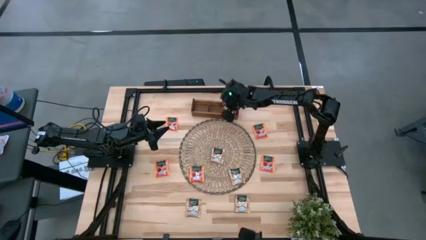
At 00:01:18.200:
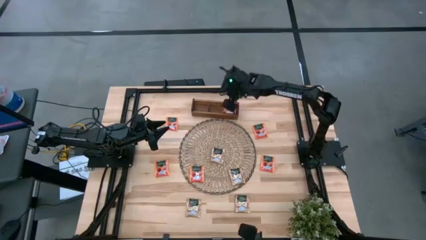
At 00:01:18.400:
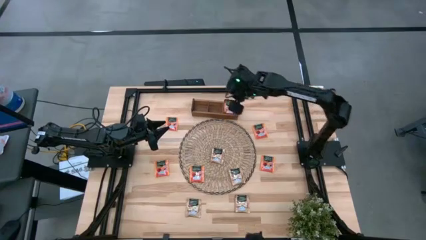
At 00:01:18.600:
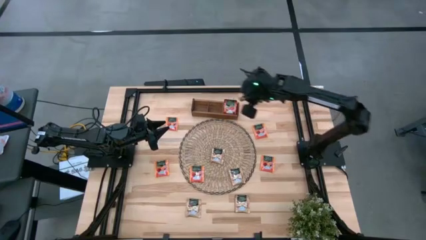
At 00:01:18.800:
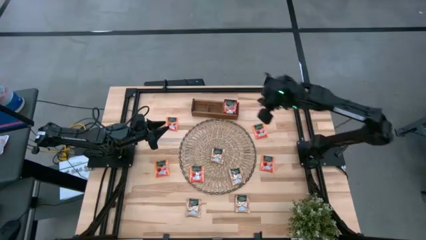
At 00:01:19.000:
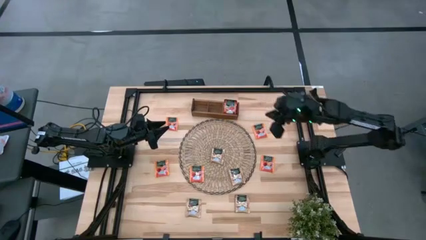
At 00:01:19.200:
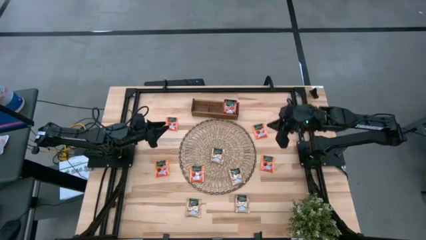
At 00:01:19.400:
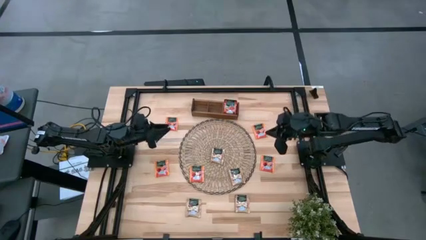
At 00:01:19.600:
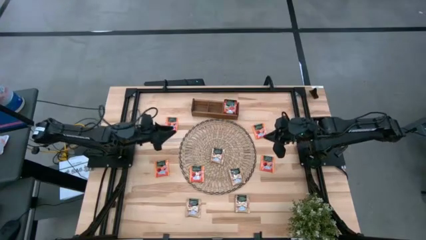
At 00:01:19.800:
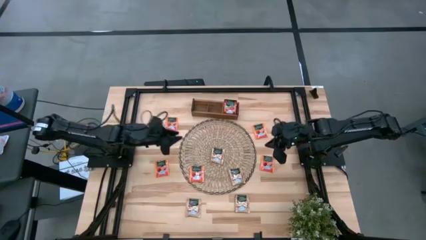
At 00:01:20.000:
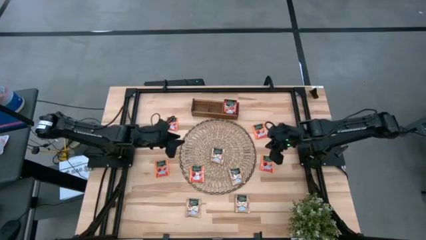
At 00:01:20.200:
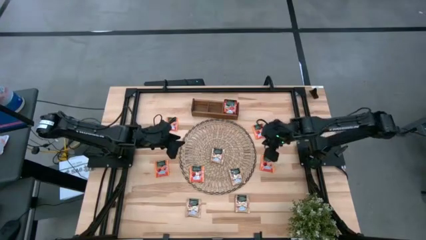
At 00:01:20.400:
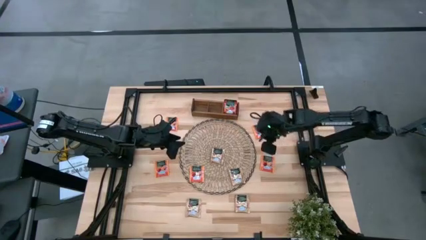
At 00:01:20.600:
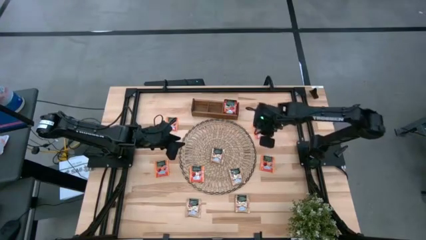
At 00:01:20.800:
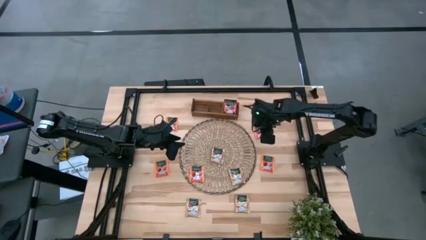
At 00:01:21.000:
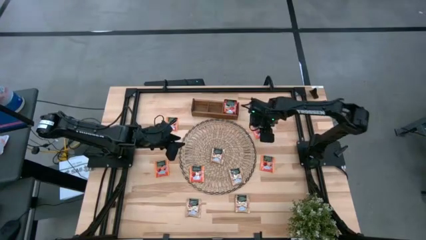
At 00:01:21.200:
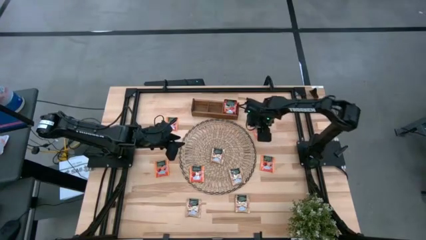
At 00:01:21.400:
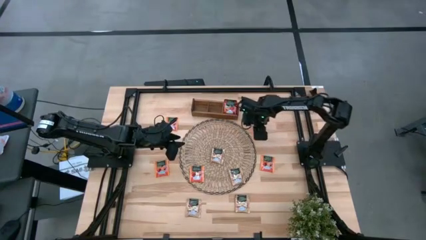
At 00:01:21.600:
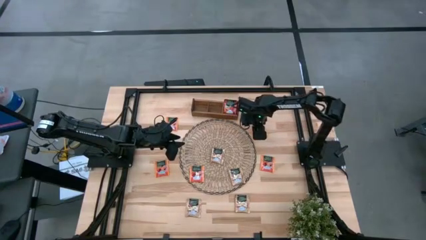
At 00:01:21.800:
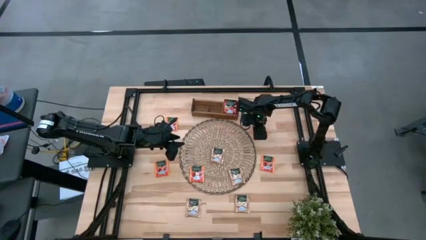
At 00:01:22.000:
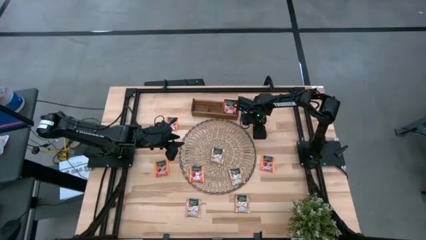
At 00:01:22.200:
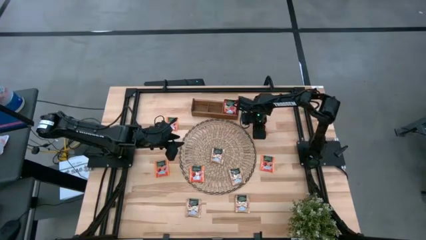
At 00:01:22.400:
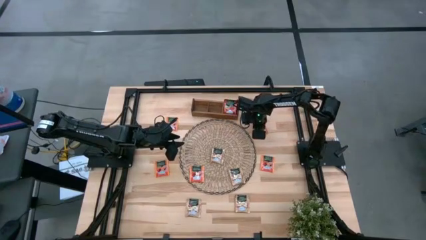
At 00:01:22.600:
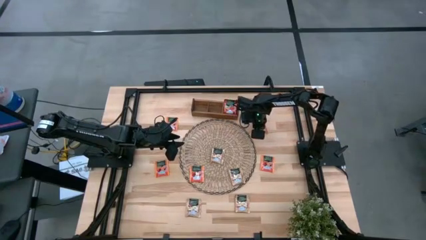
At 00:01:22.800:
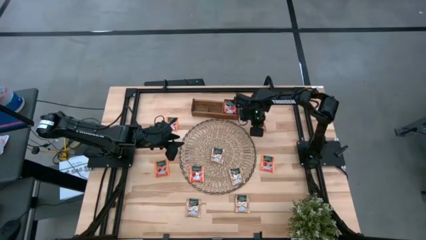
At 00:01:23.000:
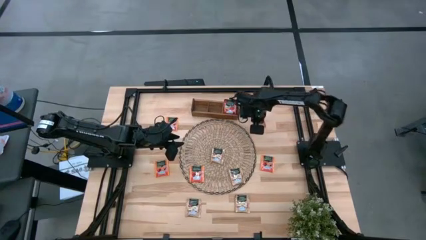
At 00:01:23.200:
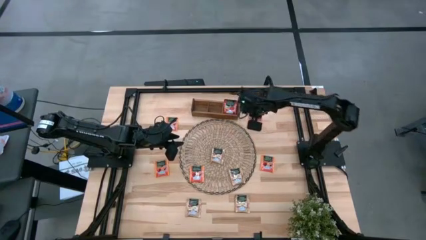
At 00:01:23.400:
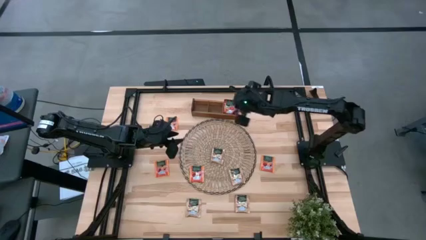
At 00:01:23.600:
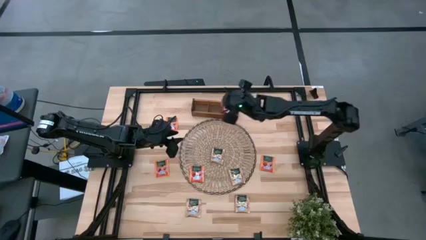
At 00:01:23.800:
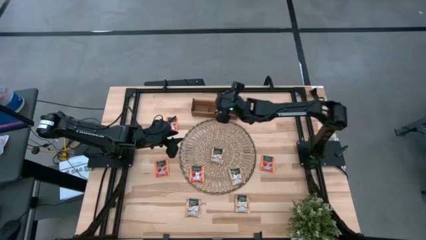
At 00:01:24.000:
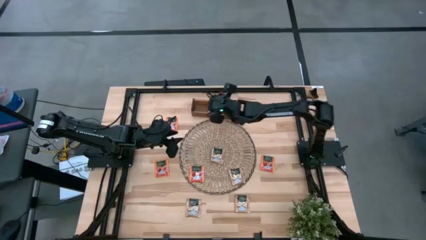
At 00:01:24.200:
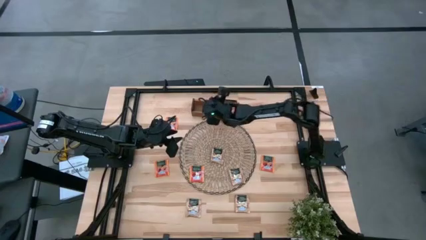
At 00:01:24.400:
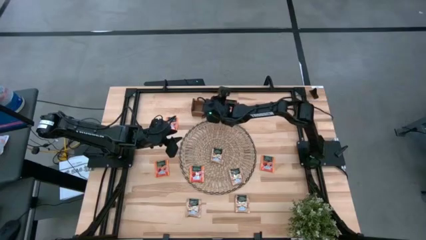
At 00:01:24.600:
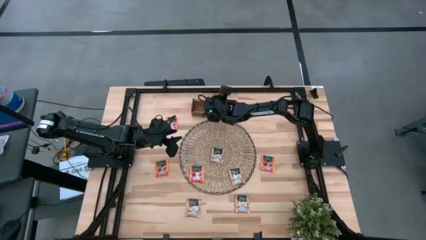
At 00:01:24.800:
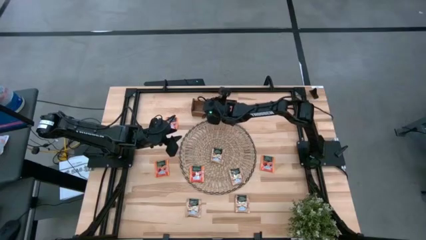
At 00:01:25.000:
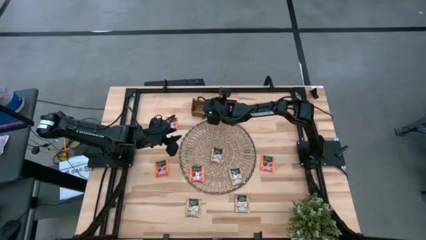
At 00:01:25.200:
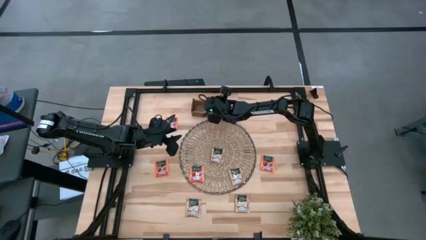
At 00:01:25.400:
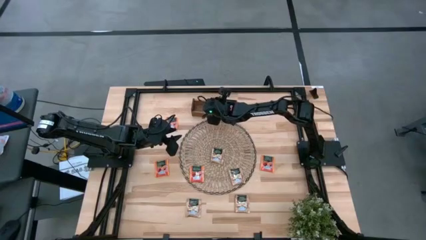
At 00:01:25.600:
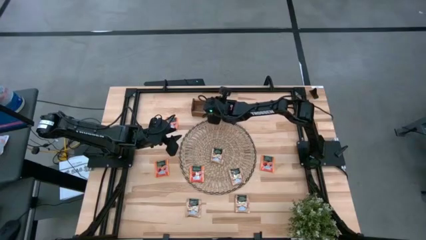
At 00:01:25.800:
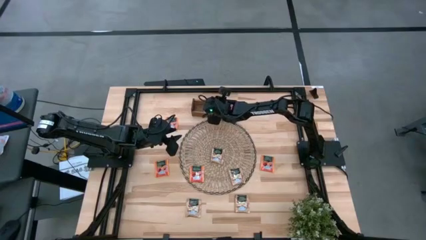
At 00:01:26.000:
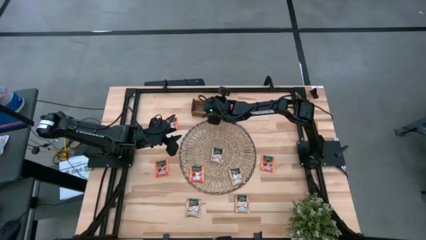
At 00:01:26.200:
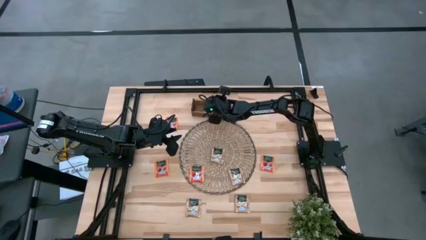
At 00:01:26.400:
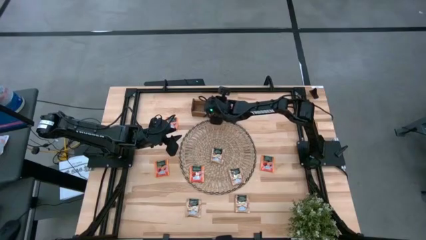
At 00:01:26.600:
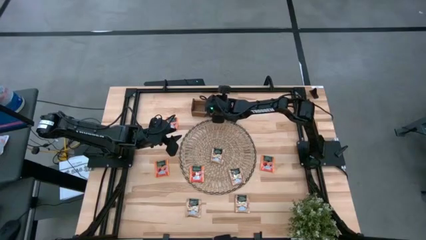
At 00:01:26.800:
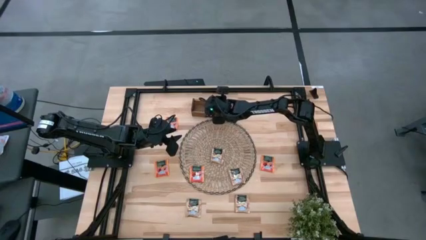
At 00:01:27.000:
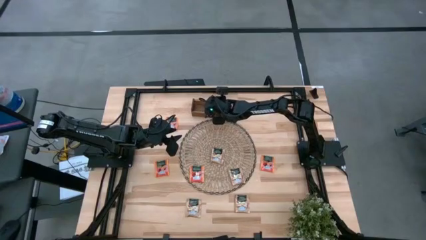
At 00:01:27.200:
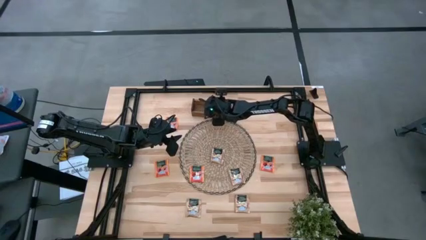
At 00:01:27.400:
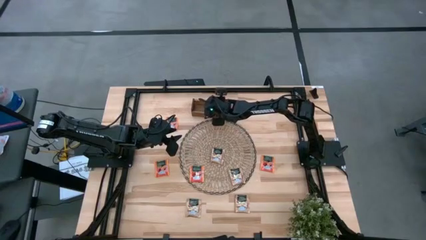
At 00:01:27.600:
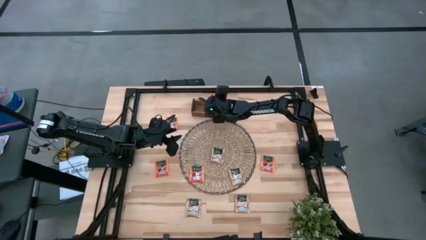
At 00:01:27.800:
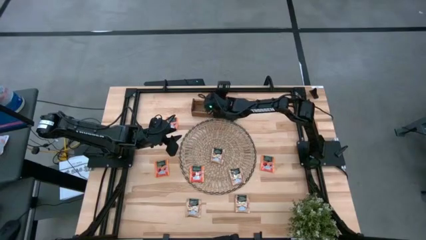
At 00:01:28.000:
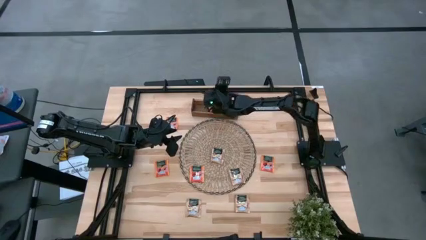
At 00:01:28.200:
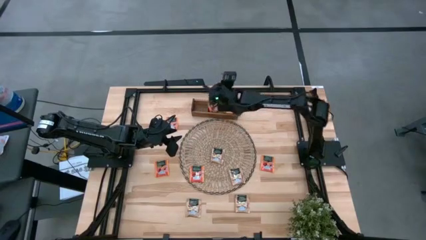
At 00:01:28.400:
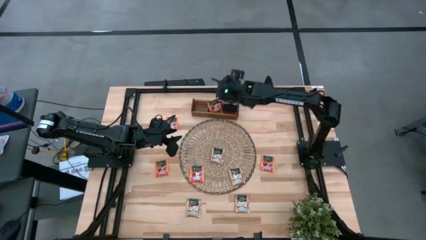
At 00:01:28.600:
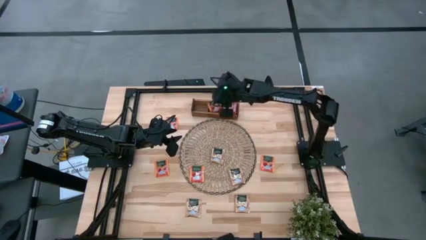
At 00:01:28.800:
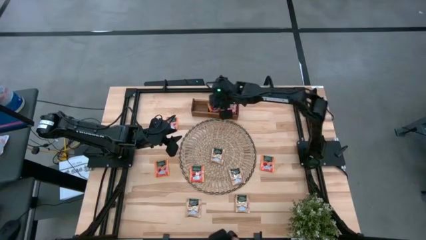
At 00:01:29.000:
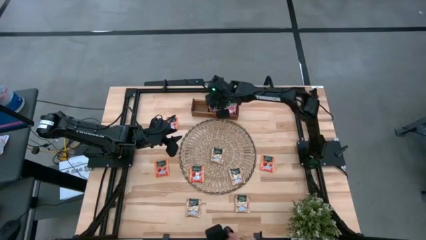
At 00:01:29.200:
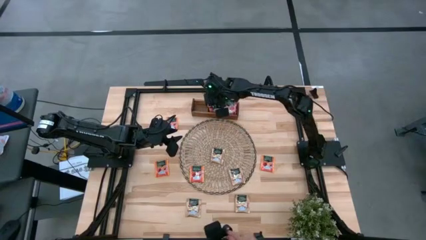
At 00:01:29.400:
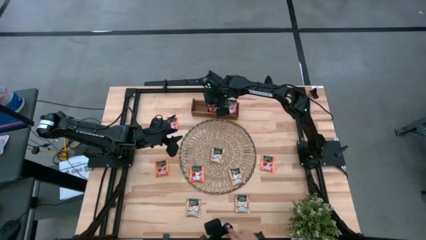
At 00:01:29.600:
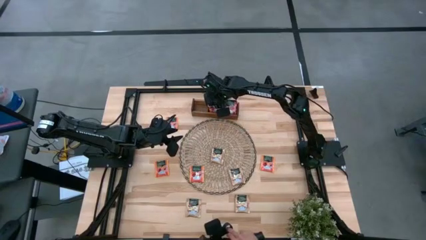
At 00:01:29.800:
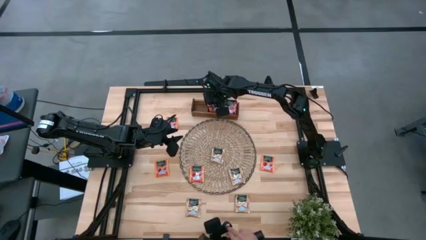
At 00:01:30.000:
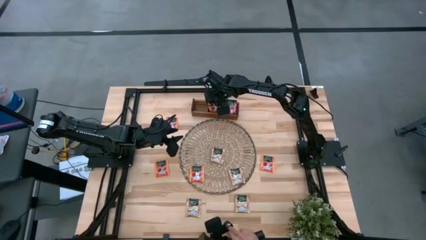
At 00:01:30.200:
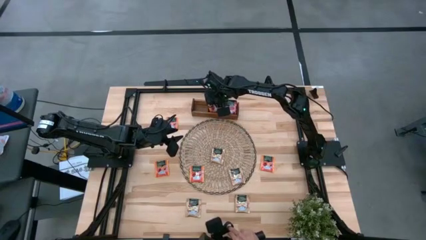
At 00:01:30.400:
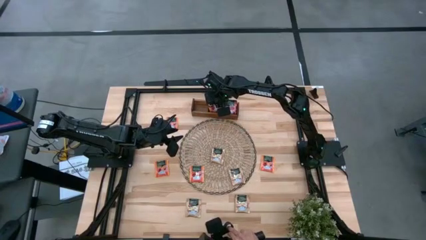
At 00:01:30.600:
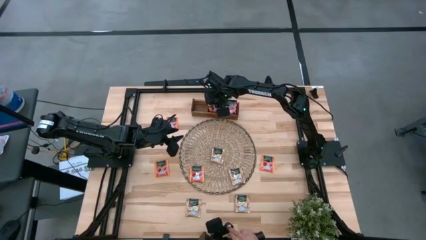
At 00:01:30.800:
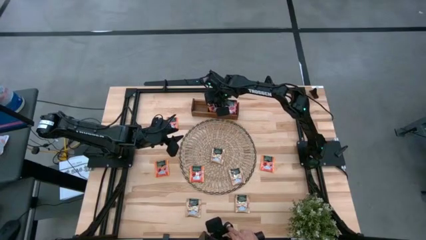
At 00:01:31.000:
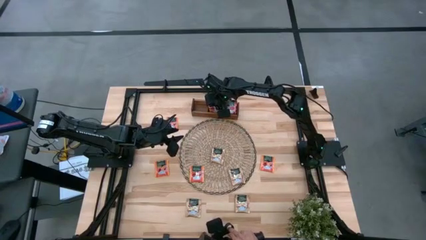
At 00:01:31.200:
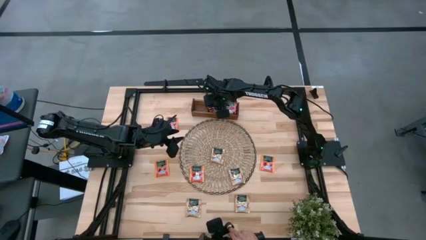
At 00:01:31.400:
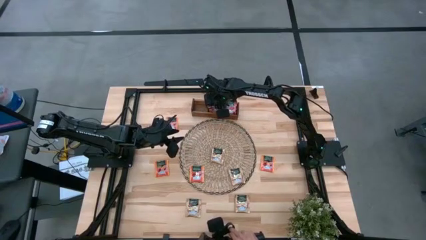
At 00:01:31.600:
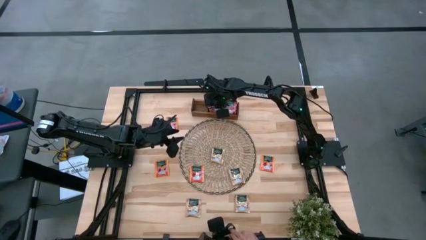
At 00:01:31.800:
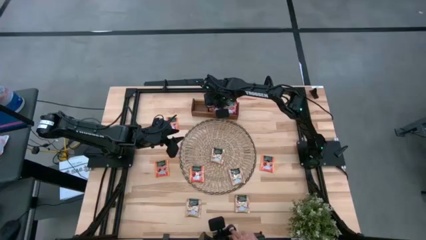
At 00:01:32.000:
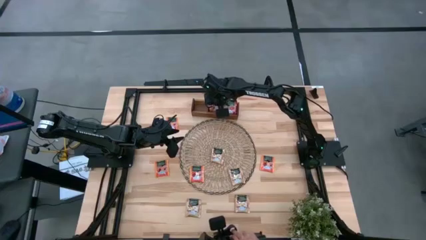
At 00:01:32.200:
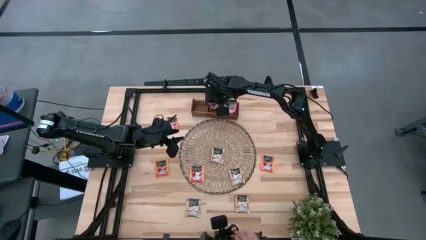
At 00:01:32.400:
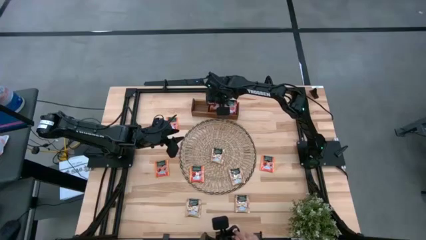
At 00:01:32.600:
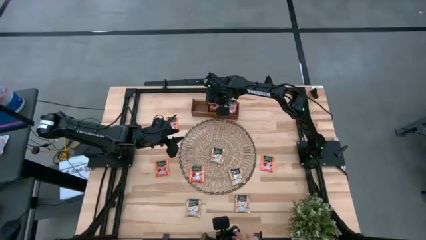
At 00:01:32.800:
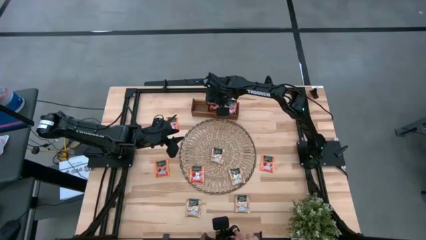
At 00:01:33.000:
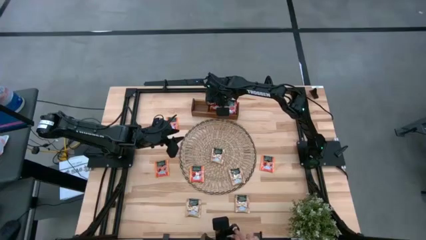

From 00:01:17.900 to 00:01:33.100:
Task: Pick & Place Tea
Put the orange tea bag into the middle section of the wooden organizer
